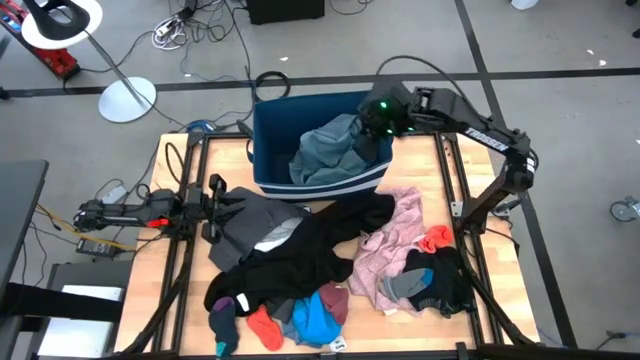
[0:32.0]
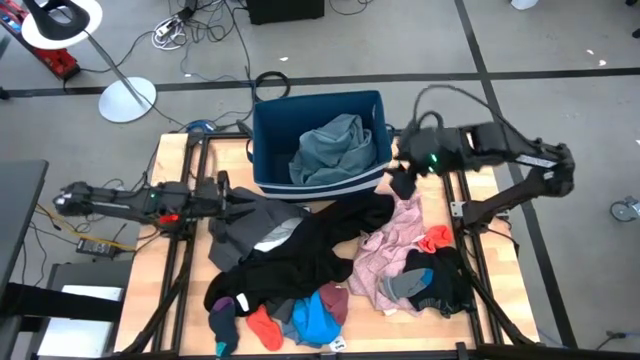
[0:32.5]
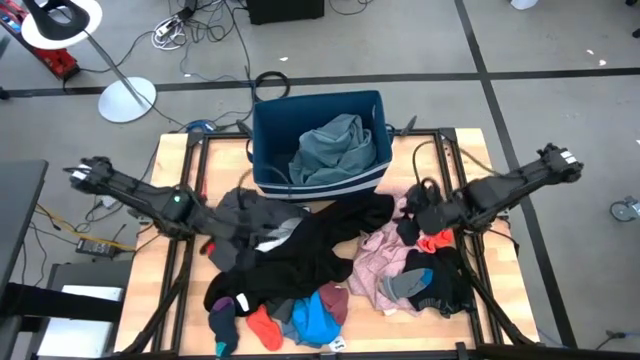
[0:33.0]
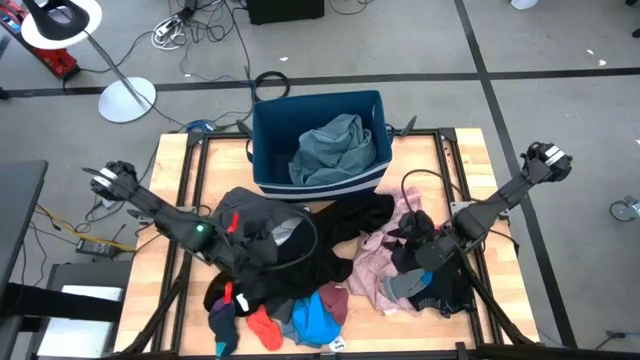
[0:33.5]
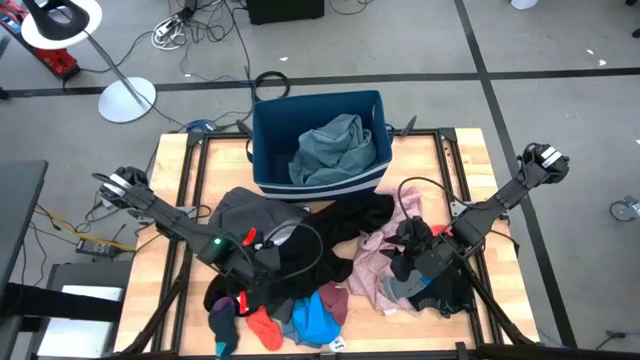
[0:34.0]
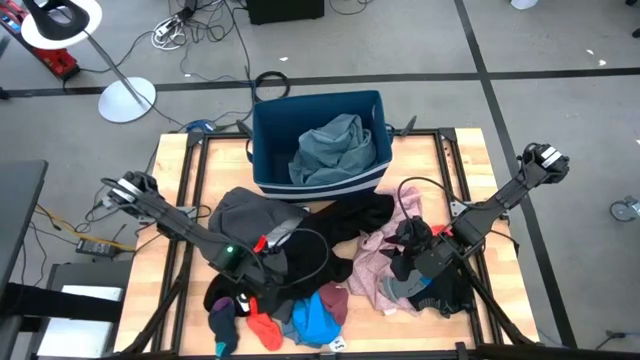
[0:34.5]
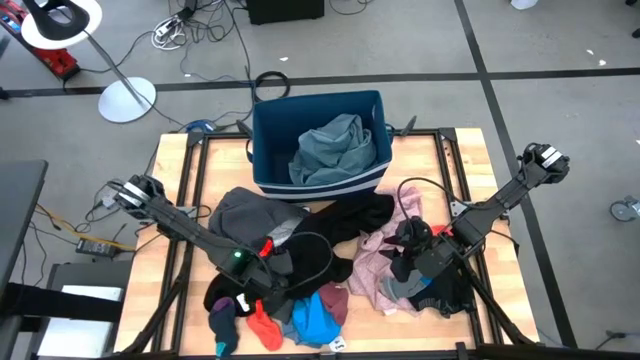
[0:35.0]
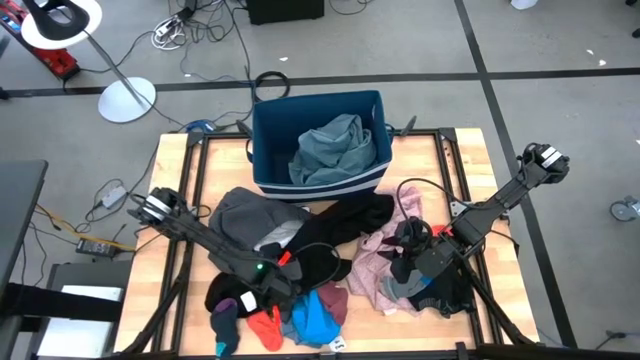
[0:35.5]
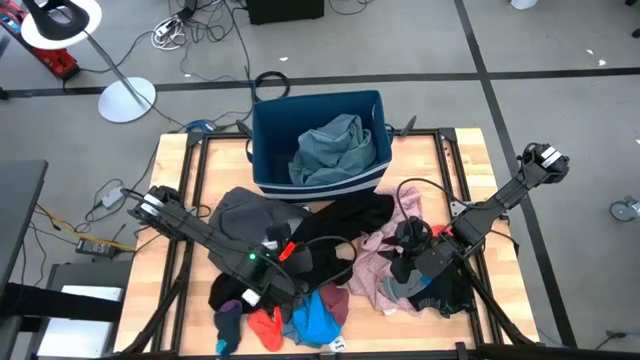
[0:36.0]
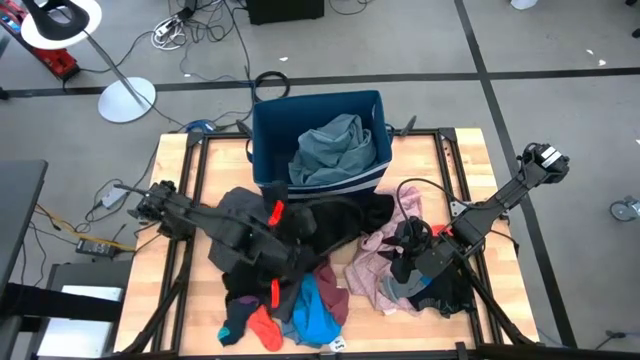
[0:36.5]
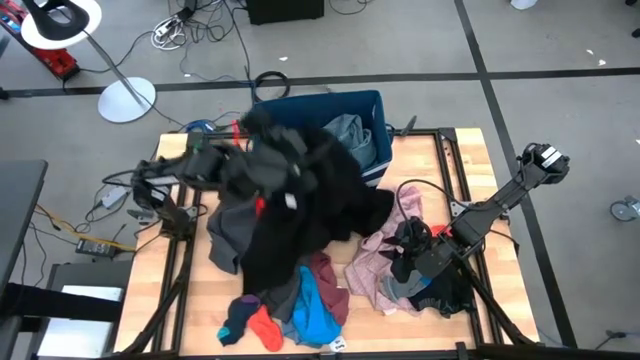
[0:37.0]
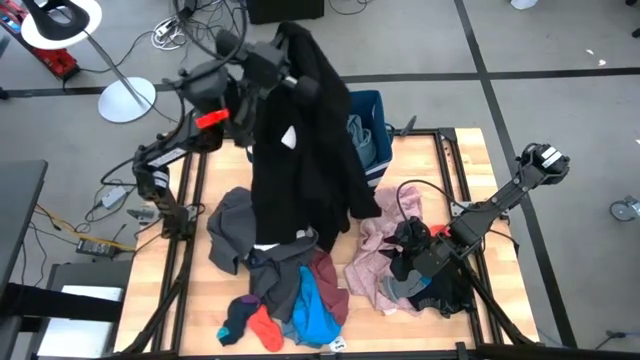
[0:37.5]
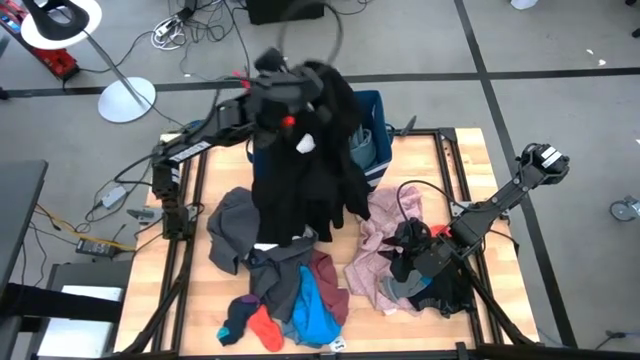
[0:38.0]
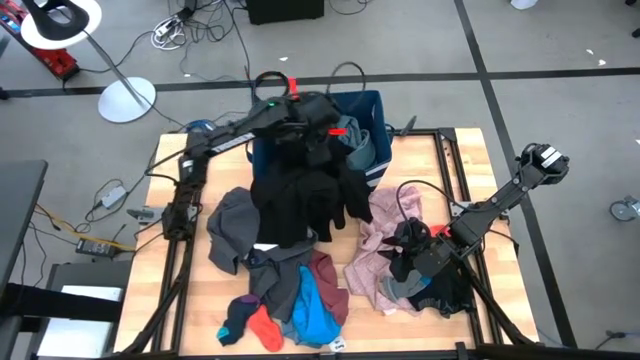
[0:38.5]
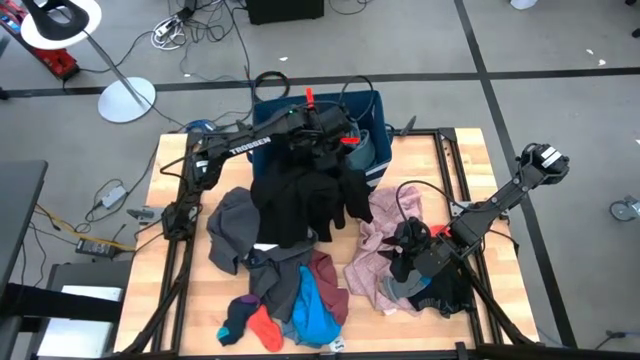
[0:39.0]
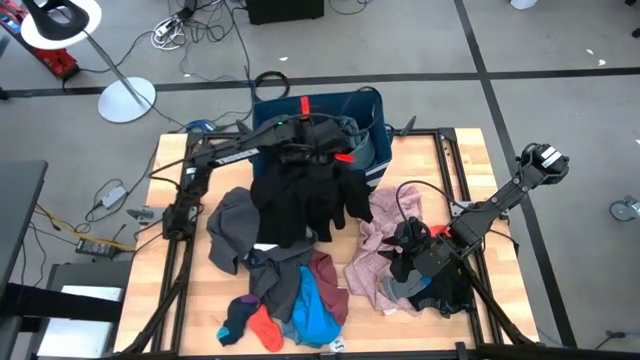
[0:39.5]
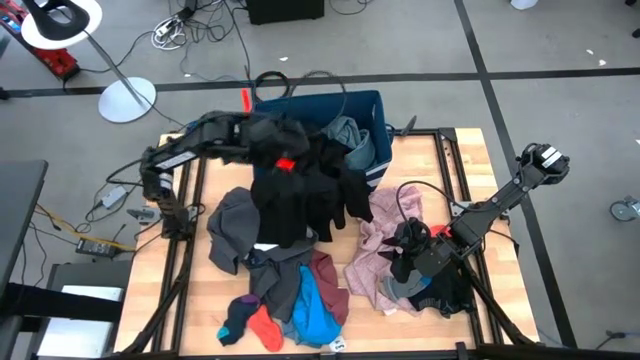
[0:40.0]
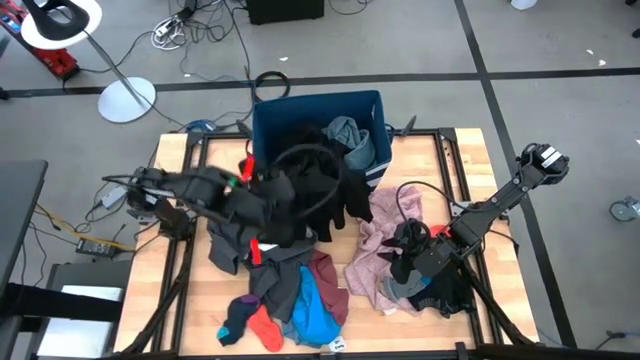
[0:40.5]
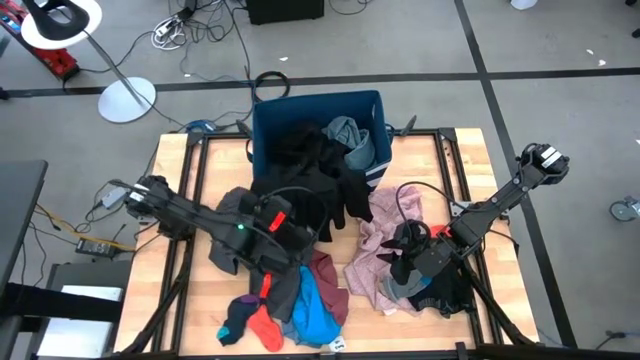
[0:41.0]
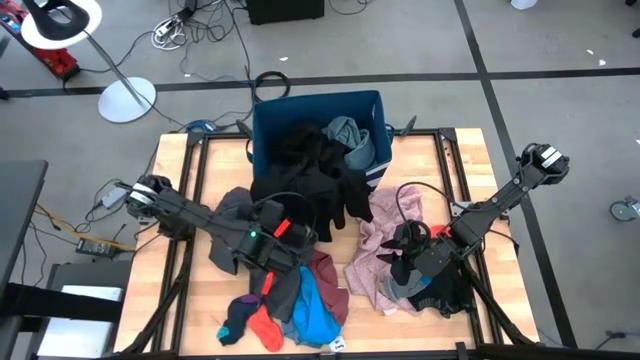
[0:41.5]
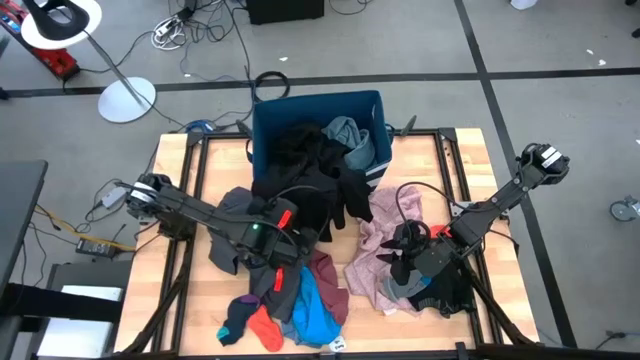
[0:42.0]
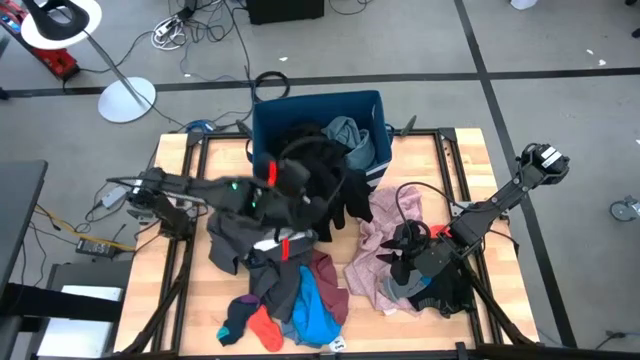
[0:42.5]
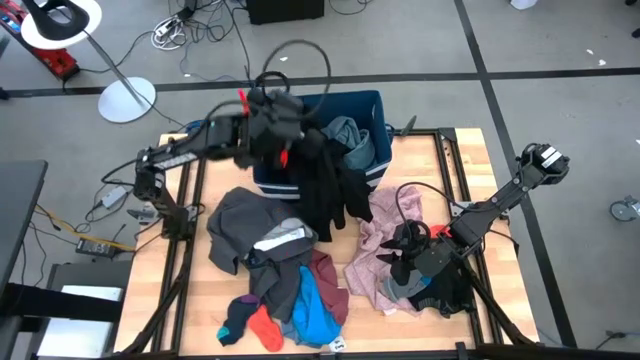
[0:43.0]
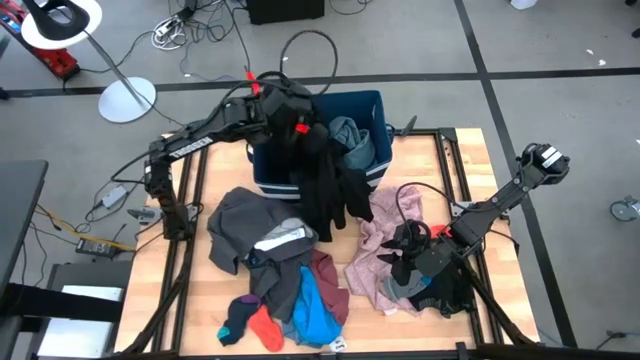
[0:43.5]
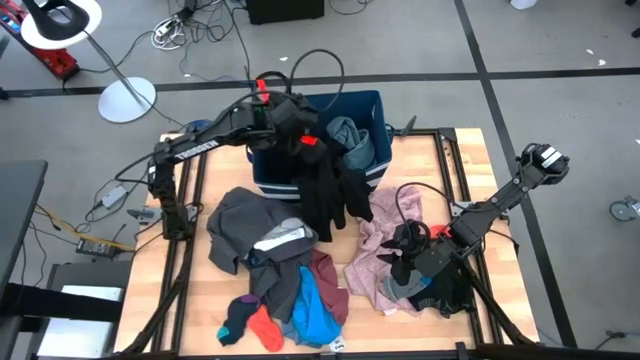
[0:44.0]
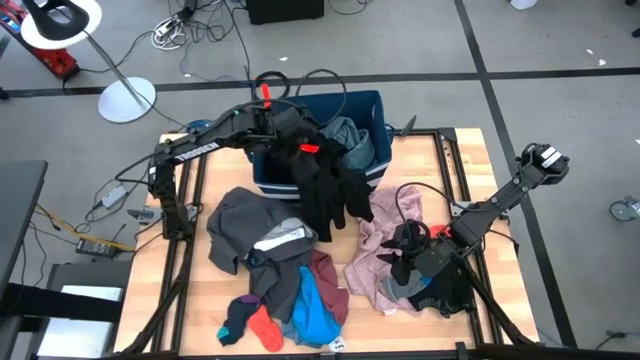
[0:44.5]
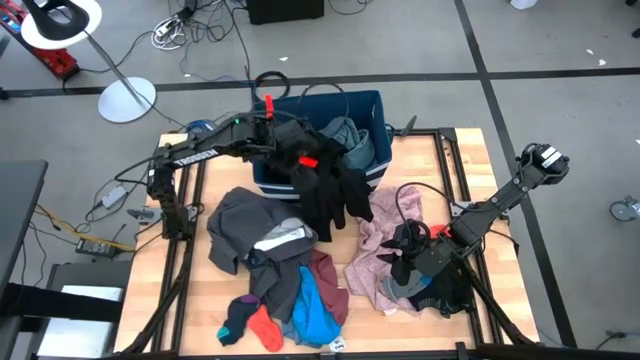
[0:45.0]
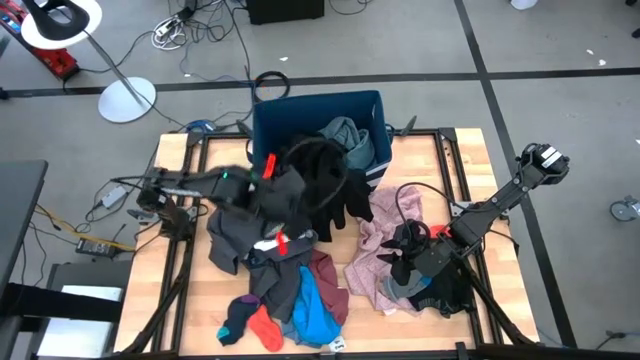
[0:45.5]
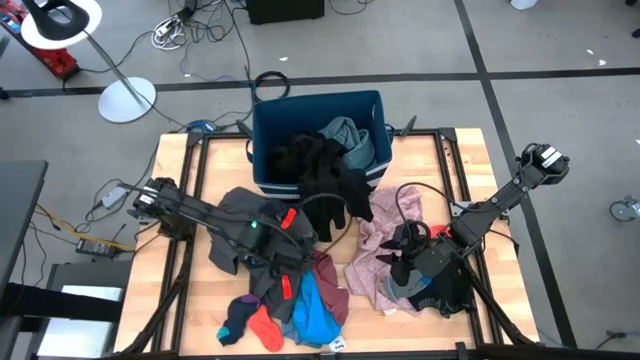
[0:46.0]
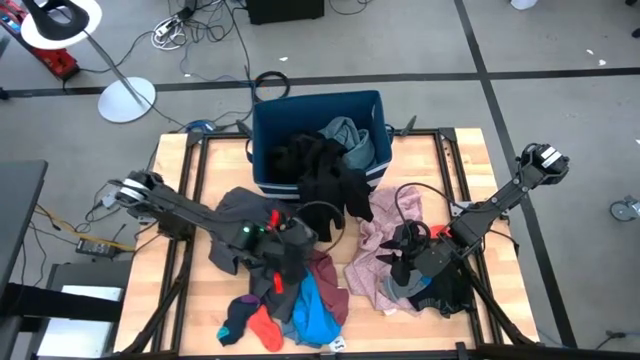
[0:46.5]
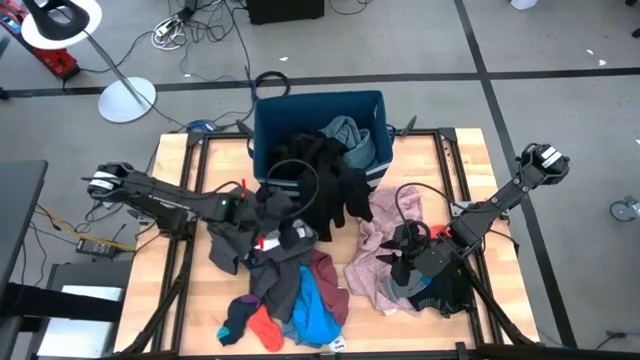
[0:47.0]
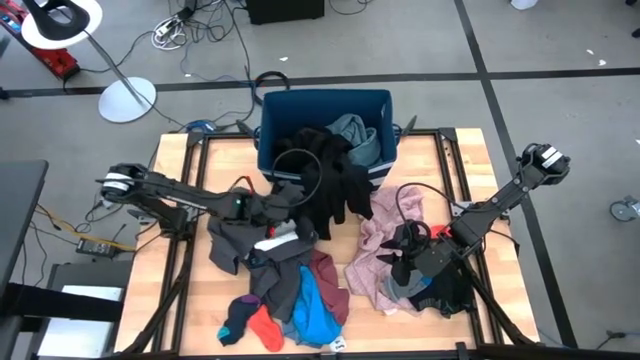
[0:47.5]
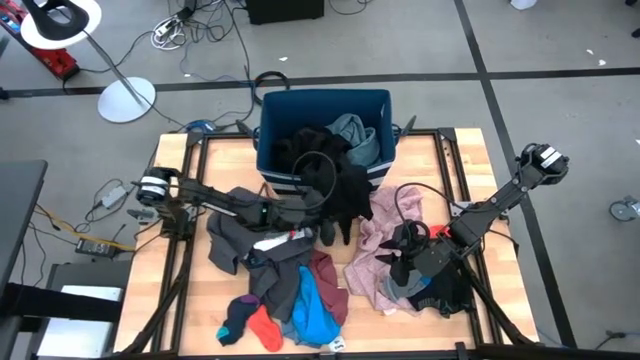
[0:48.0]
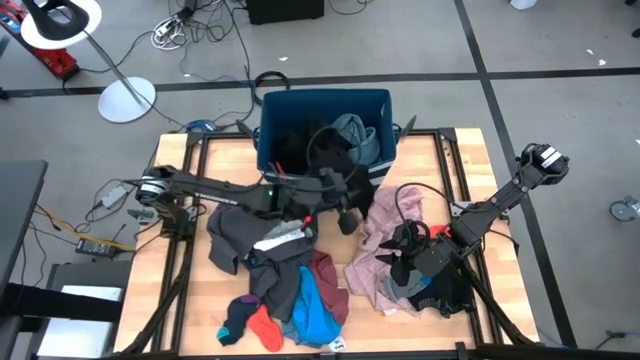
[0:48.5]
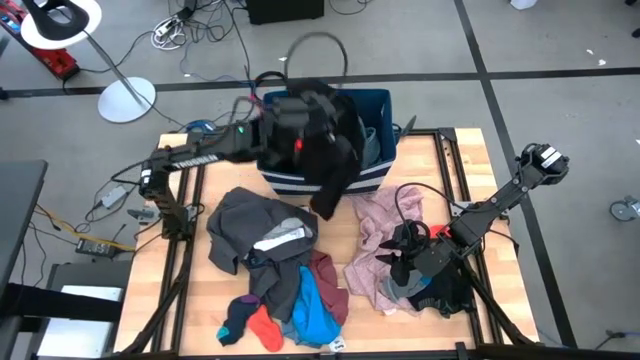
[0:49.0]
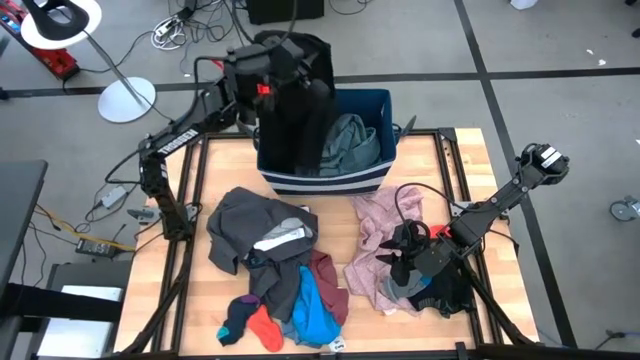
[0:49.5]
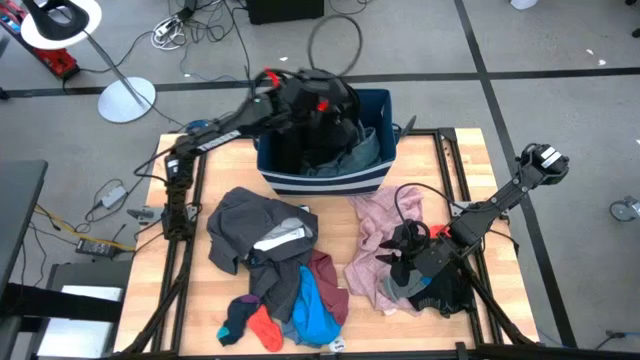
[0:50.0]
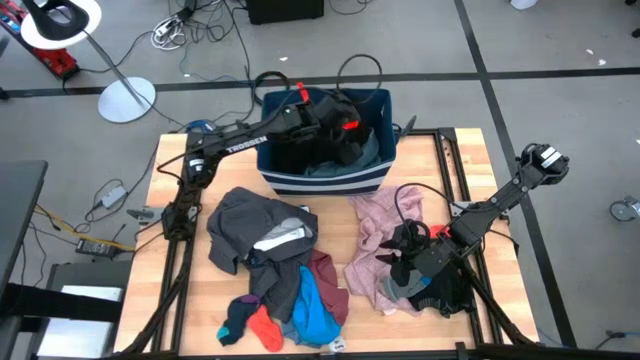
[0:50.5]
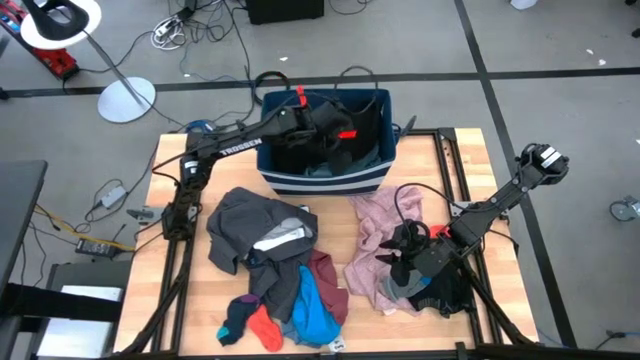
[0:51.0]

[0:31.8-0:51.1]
Task: Sort clothes
Put the black jacket into the laundry bin

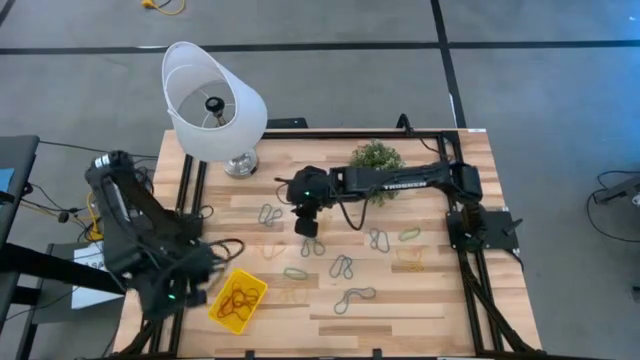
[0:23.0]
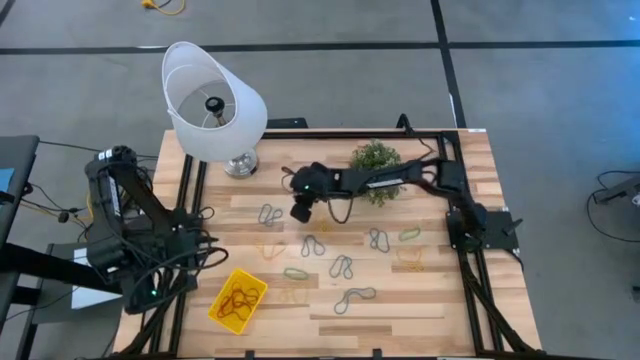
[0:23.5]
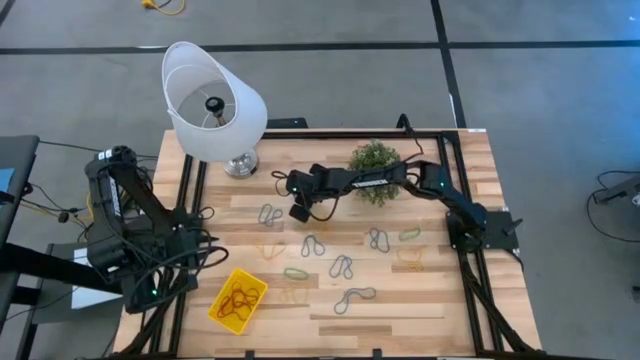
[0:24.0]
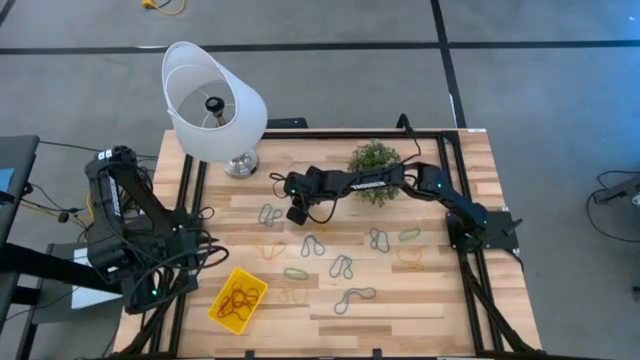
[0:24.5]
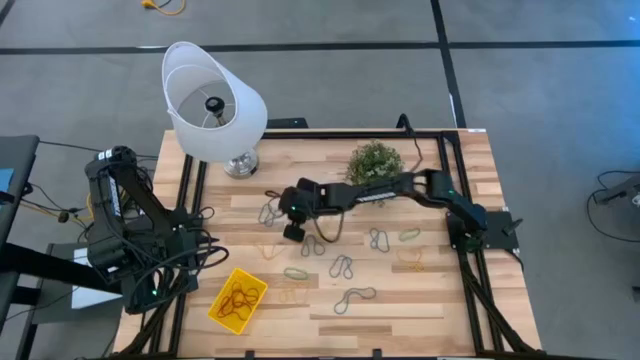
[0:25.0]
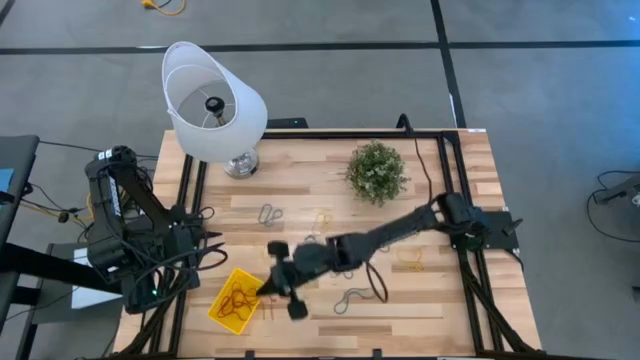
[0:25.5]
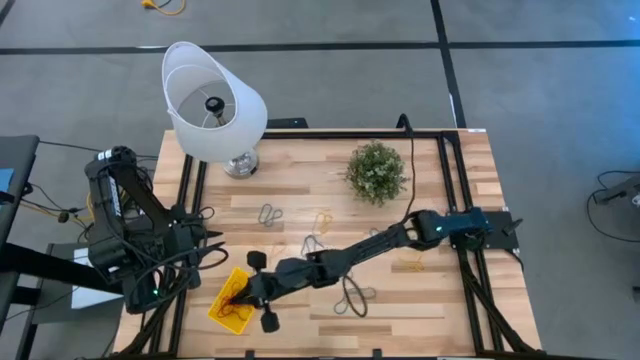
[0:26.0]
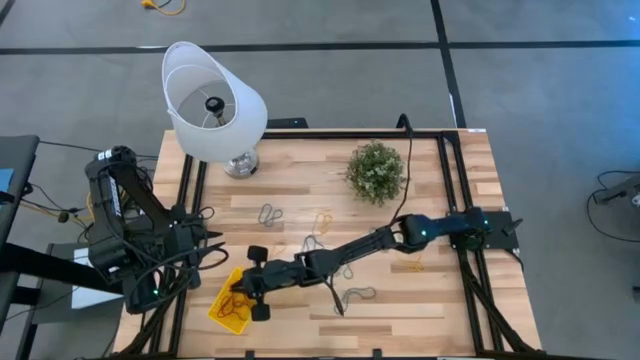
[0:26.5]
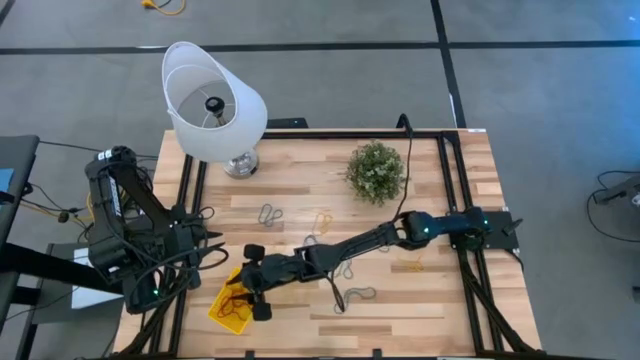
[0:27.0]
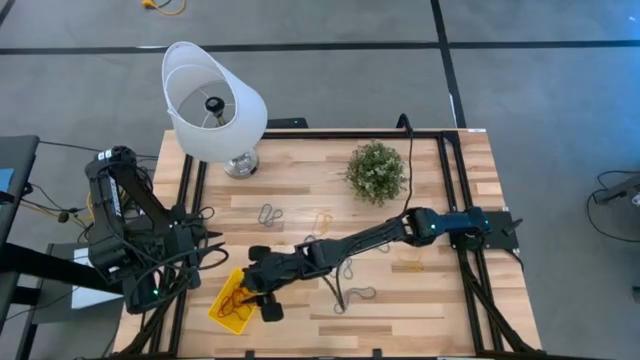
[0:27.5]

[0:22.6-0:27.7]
Task: Pick and place items into bin
Put the red rubberband into the yellow bin
